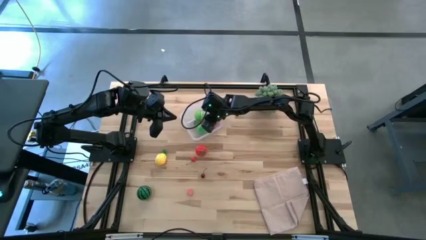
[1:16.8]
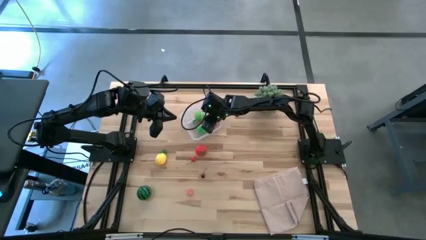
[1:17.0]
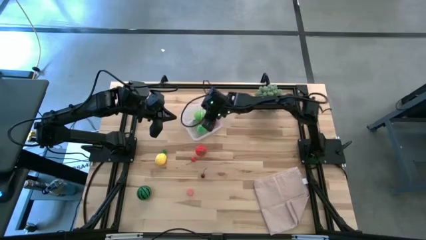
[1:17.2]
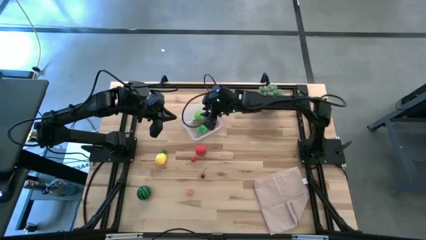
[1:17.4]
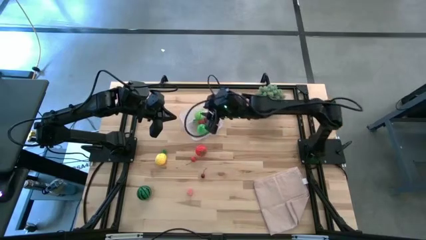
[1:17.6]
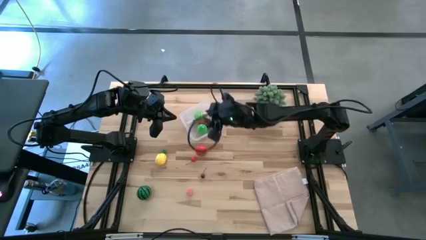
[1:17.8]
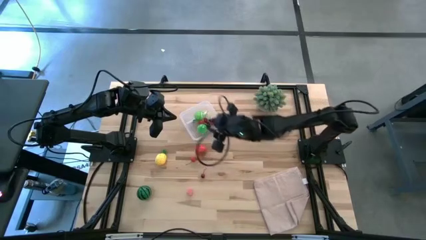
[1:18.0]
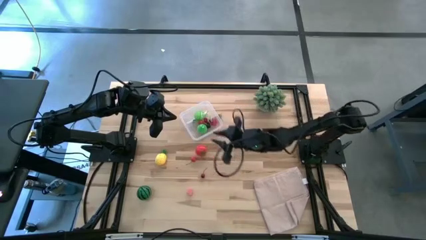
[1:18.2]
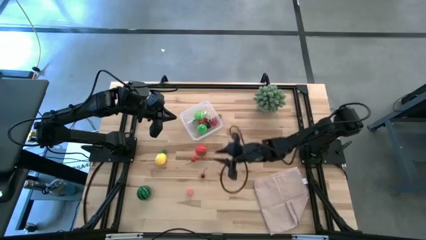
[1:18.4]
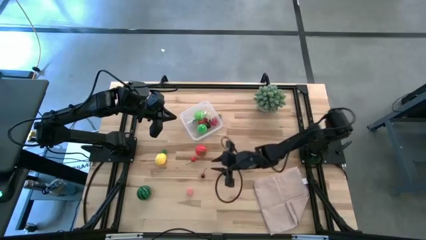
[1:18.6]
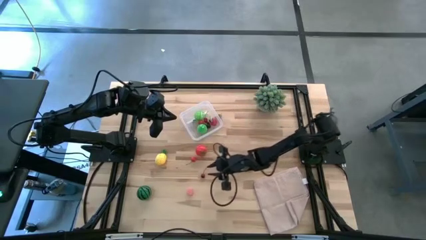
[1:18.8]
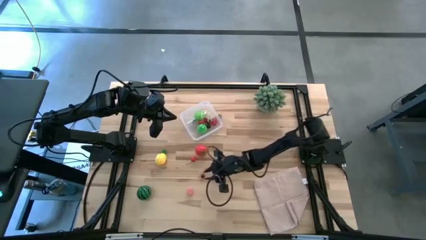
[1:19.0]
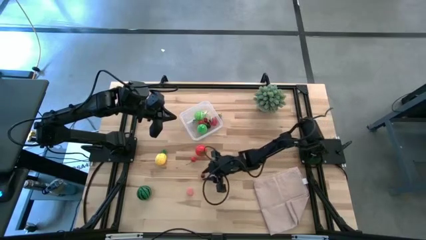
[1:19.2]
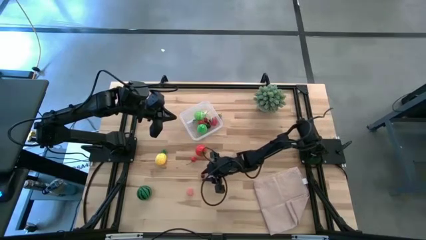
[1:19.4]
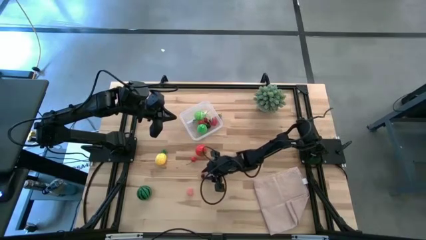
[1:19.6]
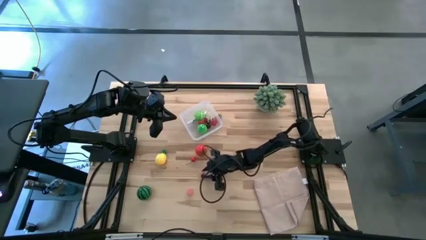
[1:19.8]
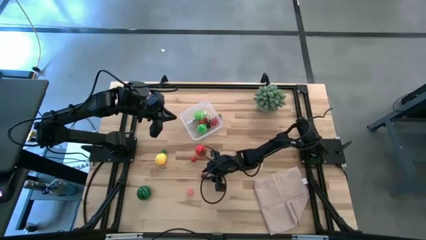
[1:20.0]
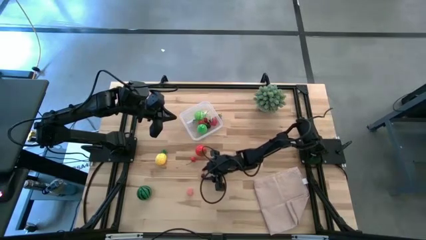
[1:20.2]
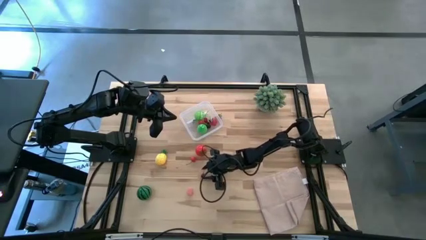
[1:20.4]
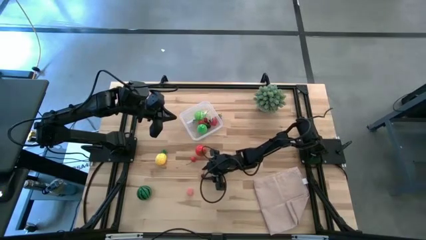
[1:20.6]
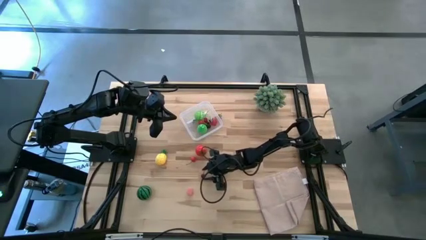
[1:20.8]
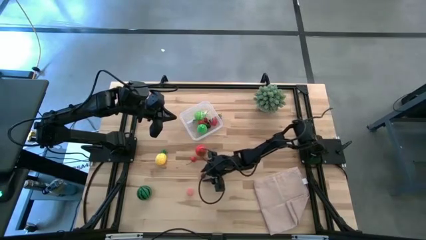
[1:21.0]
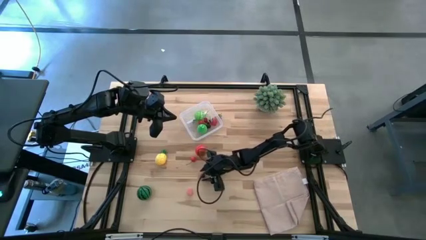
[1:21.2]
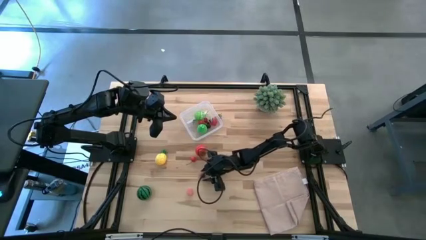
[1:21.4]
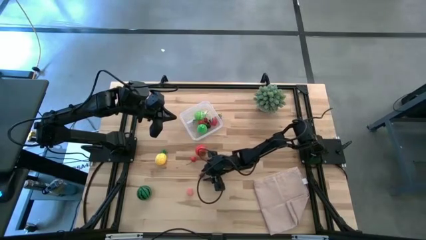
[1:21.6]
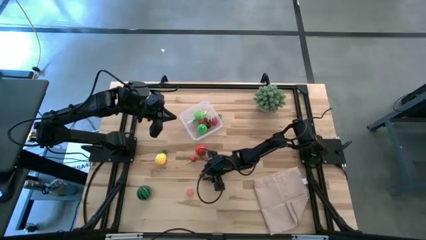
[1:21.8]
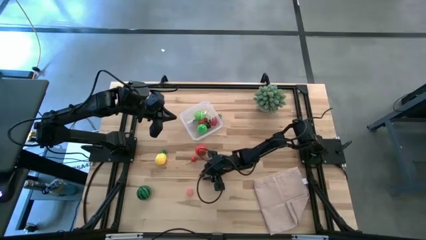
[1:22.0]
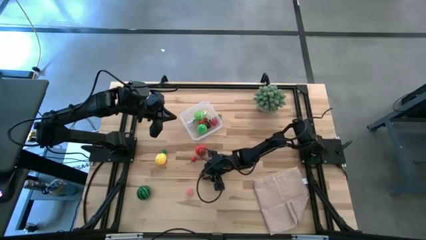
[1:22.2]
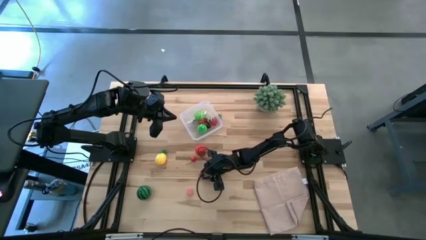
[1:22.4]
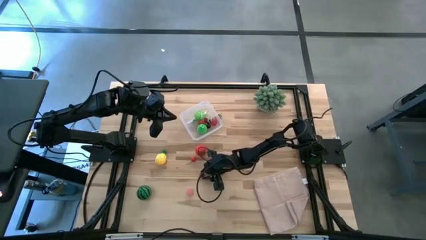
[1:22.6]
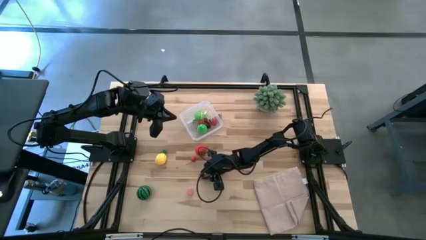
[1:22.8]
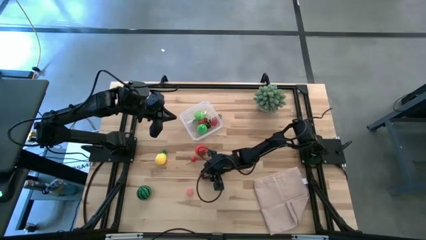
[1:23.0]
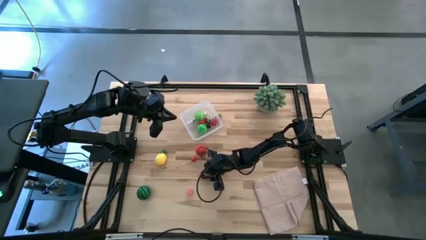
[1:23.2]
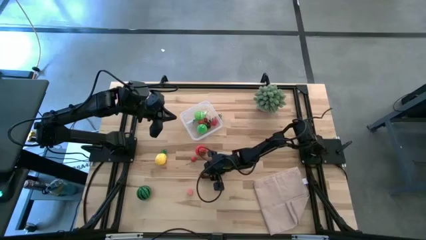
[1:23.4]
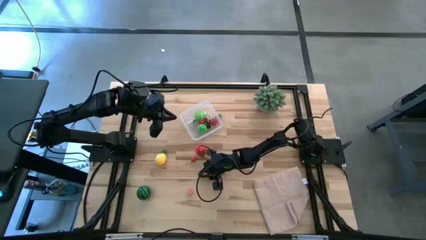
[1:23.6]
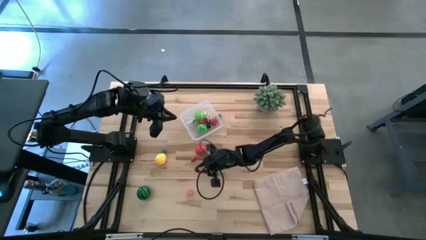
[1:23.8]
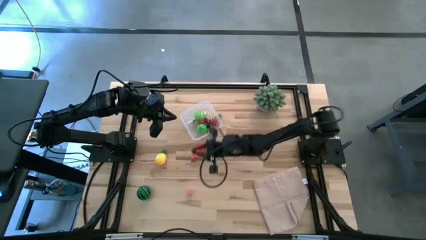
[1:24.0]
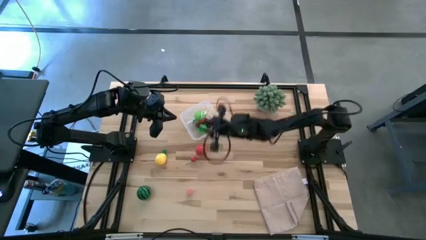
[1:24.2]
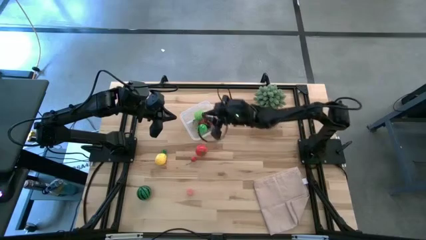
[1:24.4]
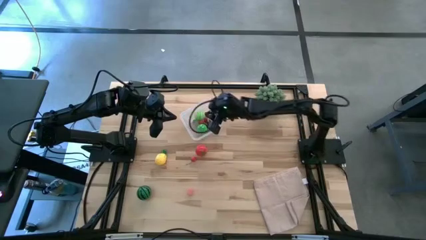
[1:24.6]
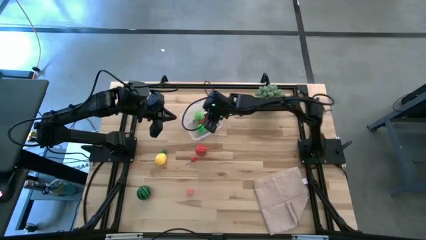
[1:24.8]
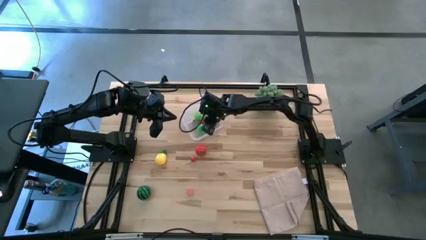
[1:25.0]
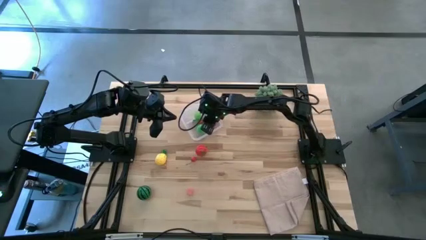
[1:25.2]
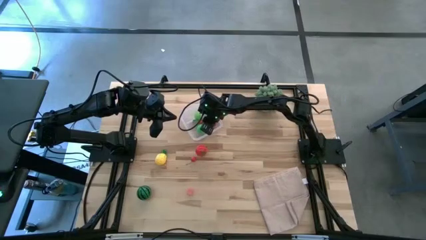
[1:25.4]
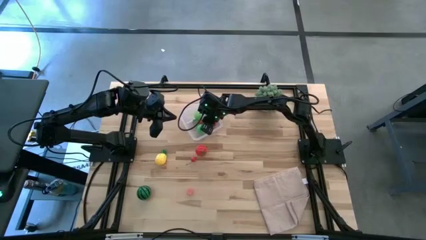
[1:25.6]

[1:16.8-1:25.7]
Task: Pick and placing Produce into tupperware
Put the dark red cherry into the transparent bin

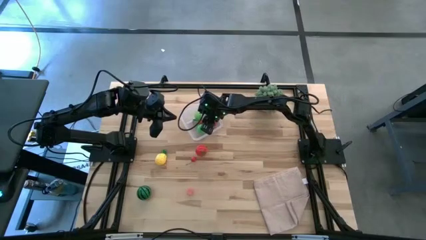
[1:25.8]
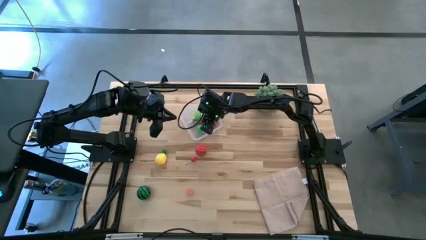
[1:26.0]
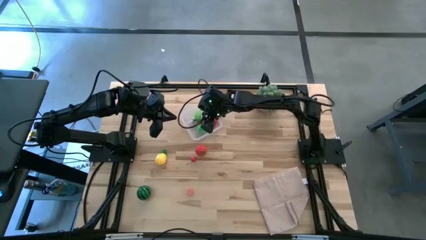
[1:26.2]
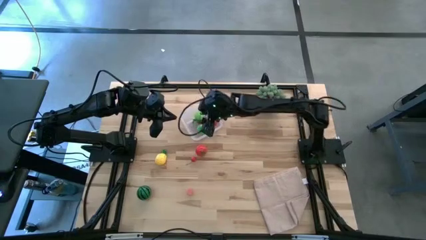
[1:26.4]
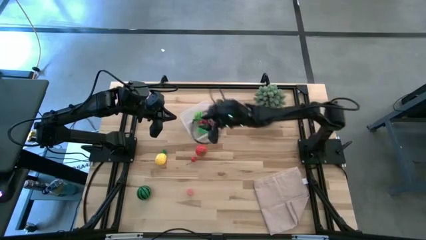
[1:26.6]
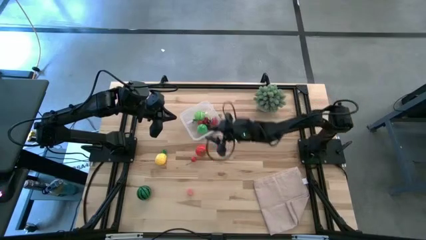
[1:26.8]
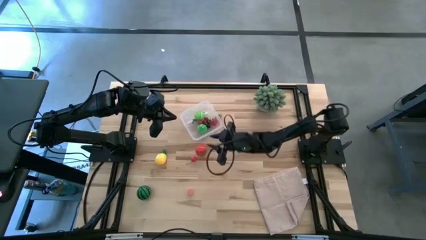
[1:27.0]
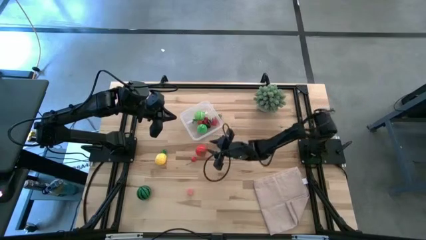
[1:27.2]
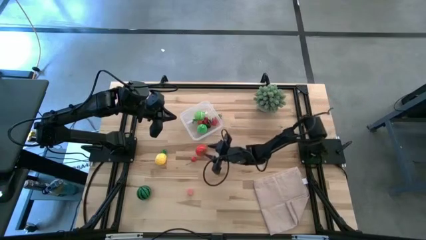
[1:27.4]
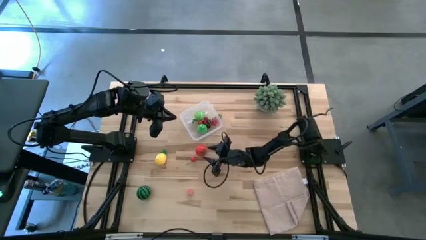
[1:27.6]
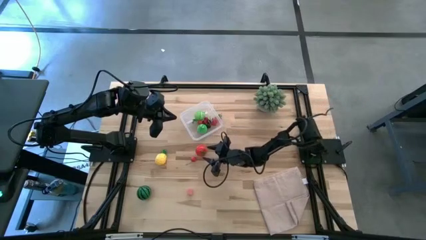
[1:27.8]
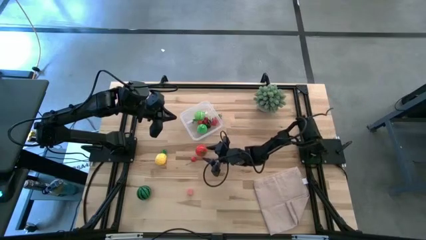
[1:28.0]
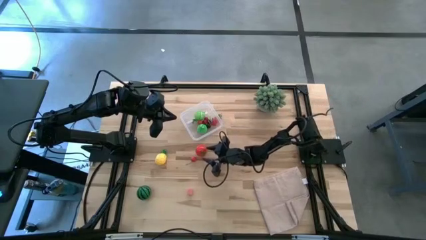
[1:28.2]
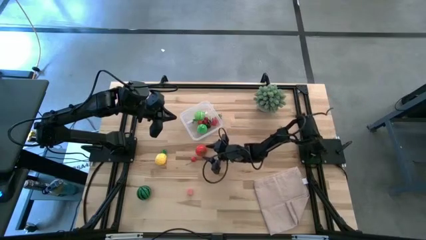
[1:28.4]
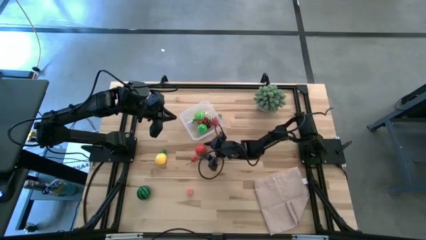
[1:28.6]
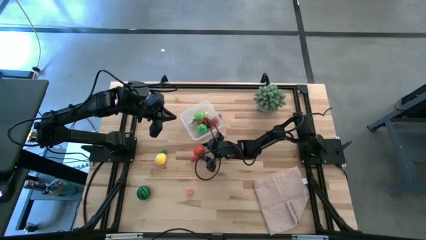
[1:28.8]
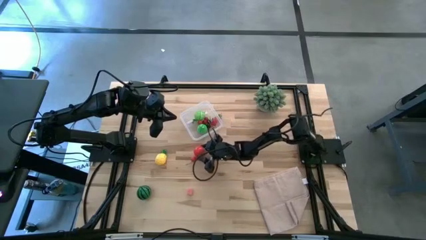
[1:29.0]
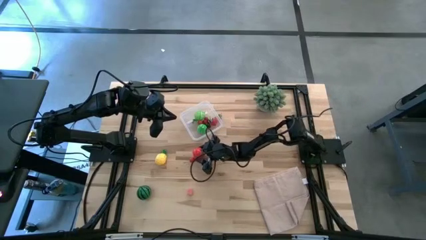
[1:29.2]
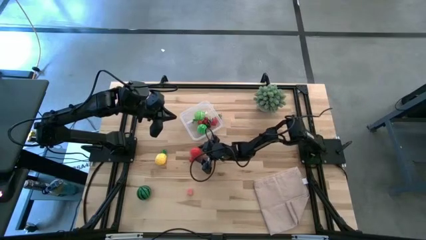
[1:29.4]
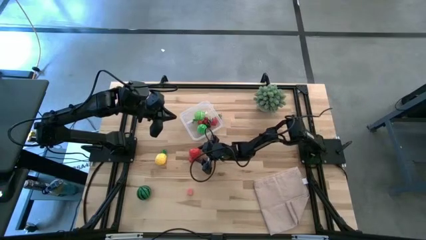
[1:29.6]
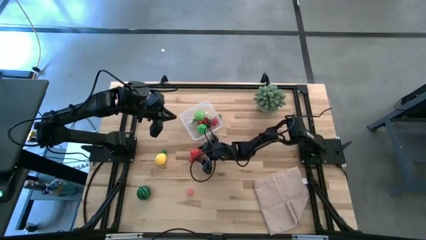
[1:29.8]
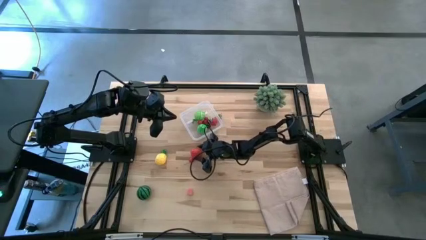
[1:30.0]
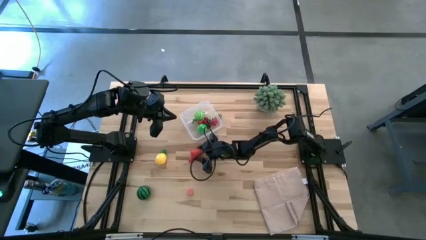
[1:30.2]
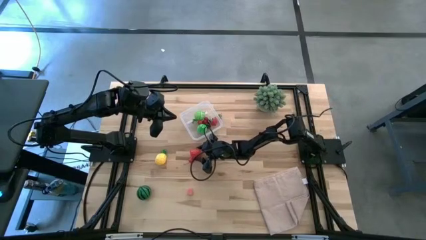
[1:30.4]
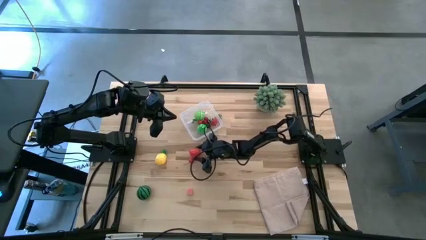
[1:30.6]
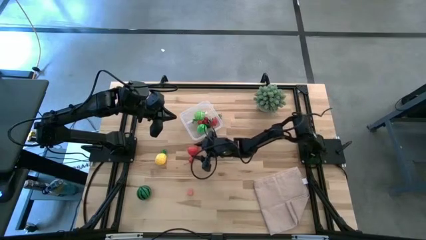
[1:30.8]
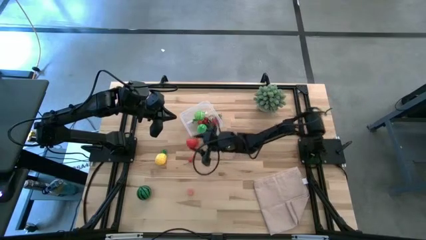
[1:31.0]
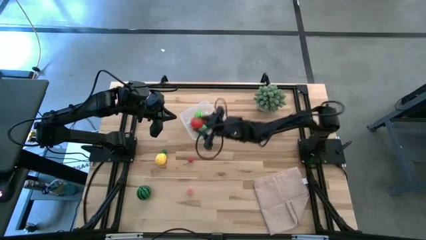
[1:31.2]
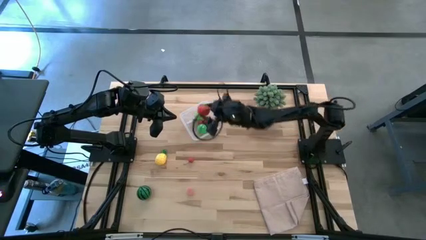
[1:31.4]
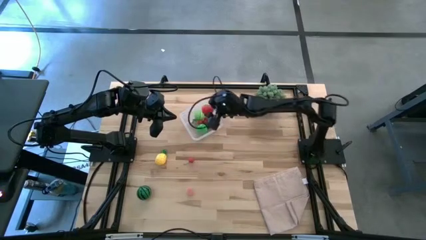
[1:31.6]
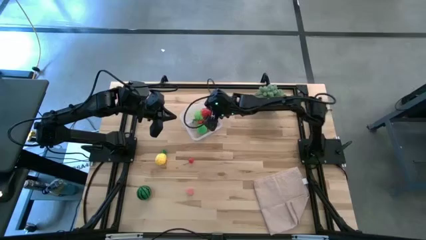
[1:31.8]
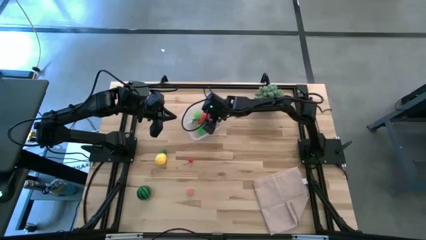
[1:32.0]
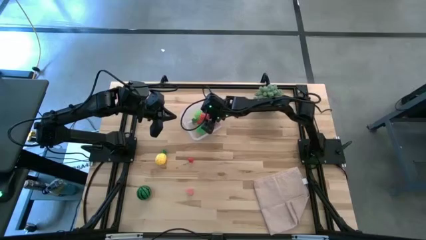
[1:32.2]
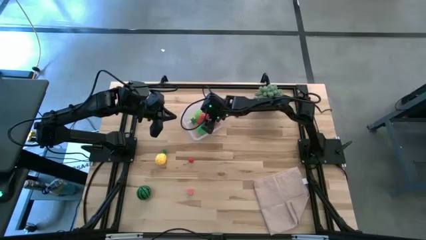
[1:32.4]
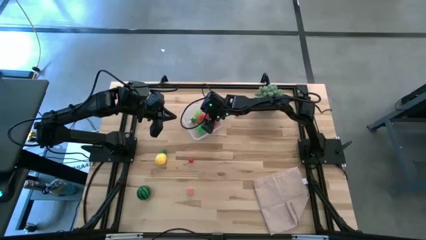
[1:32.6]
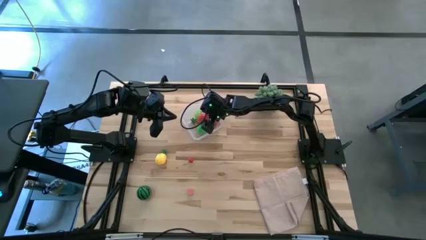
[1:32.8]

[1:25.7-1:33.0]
Put the red tomato into the transparent bin
